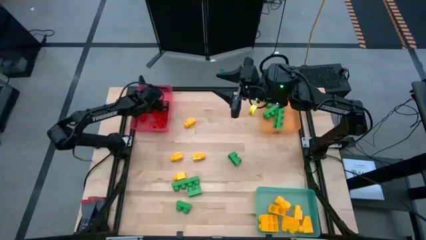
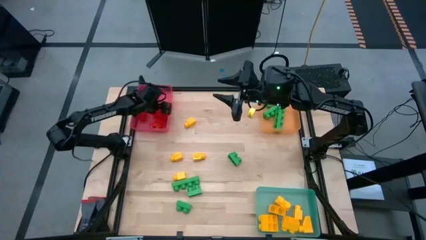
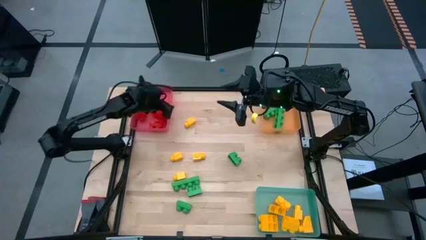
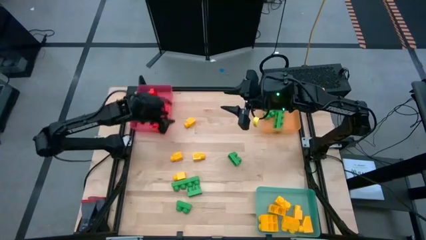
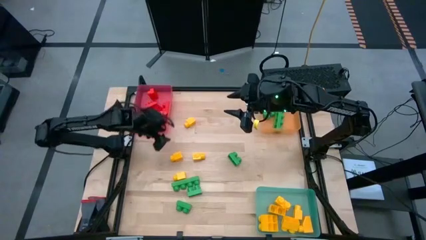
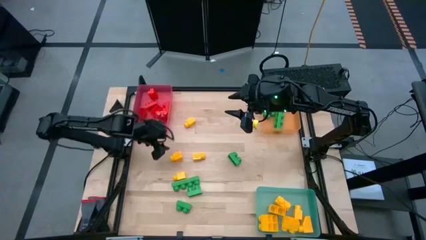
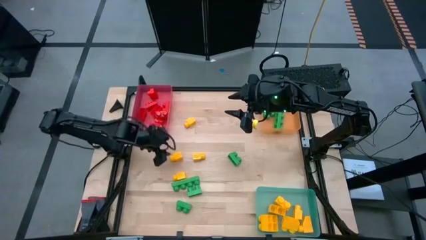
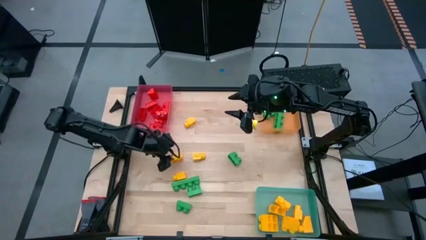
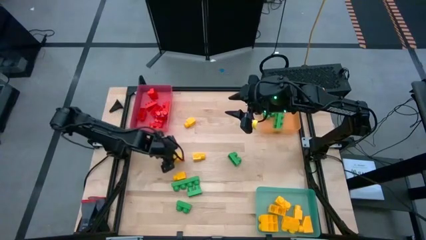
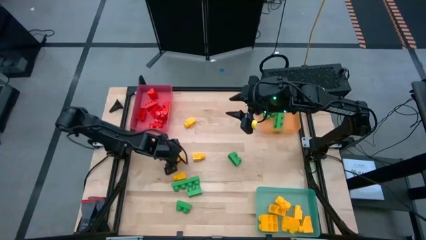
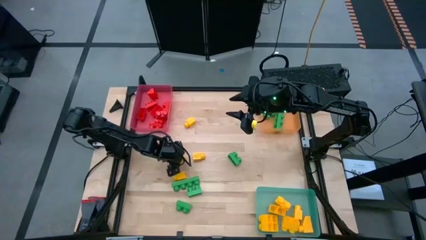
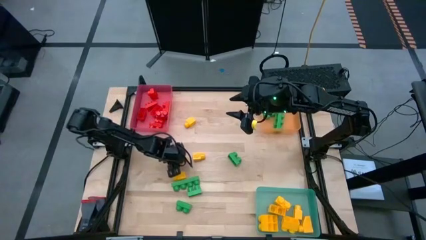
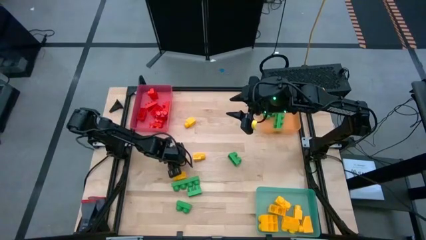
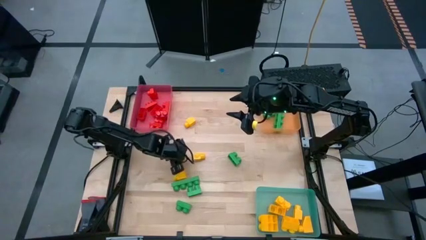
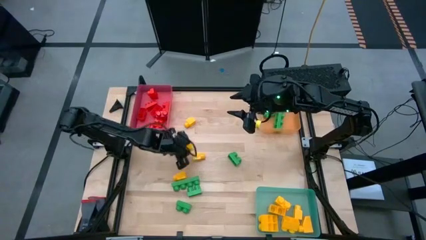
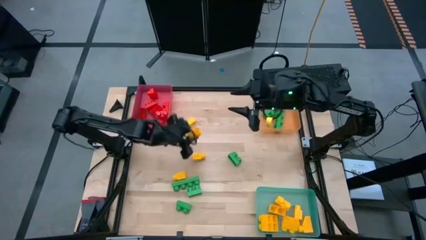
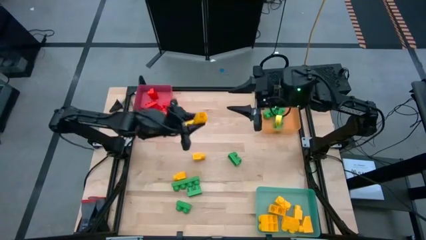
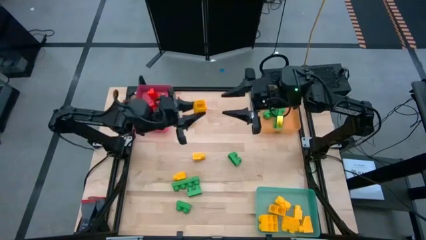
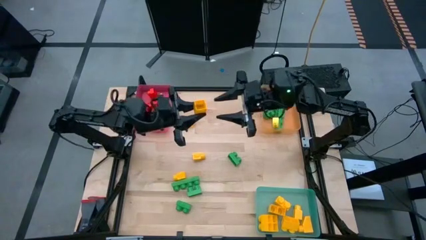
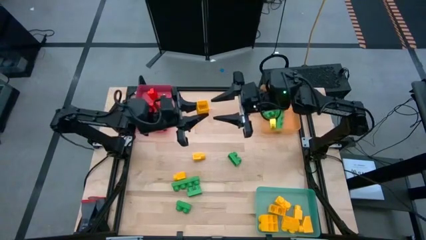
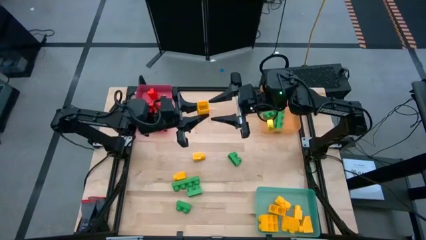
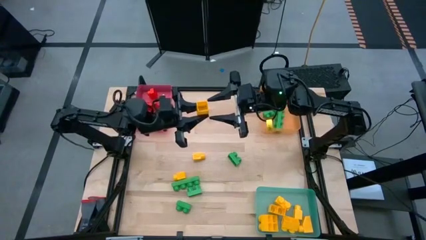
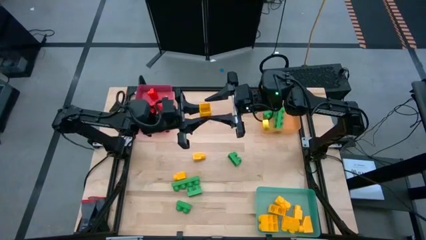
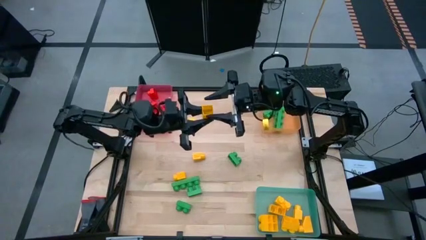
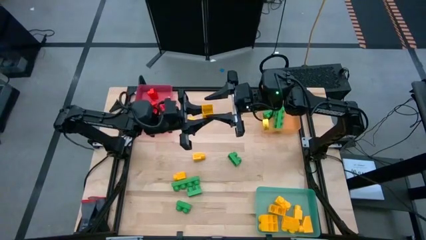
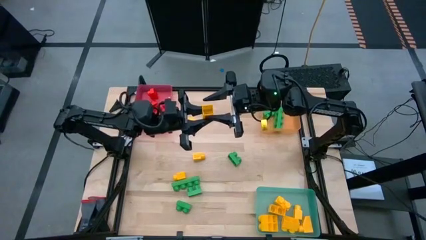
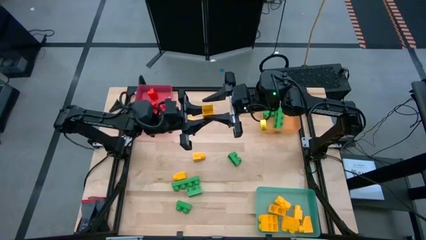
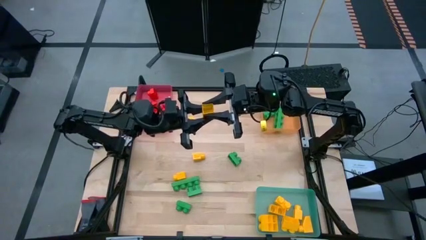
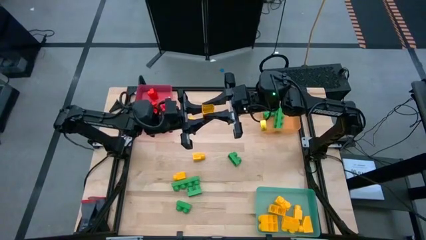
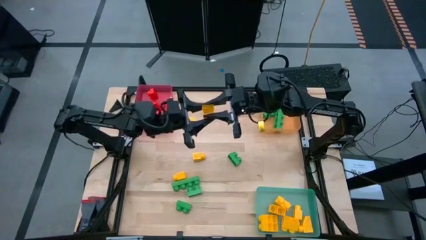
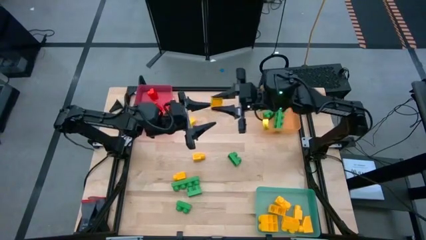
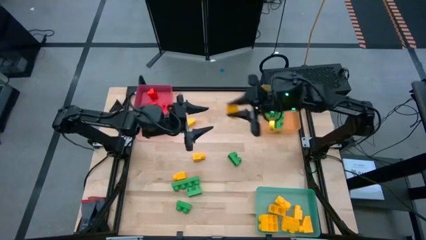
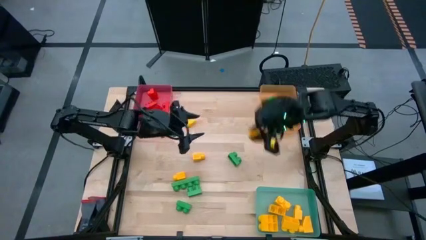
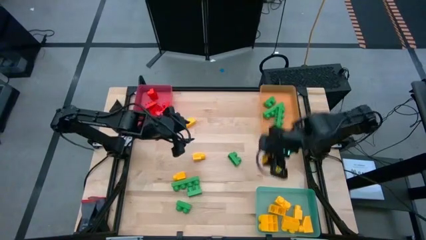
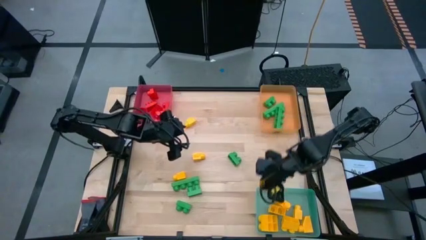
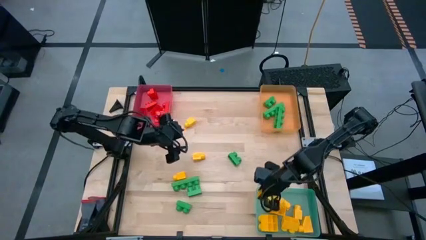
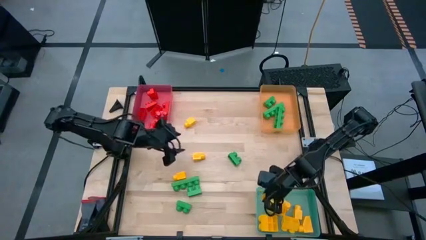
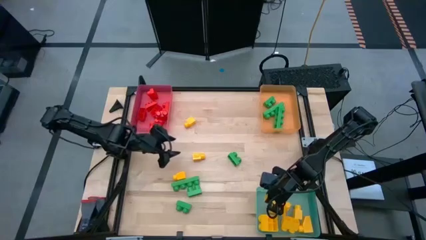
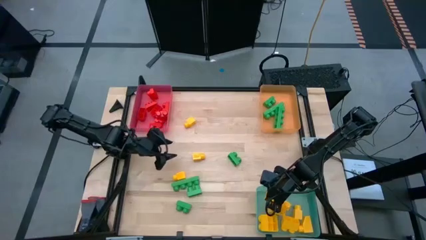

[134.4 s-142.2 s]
Task: Sort blocks
Put the yellow game piece into the blue bin

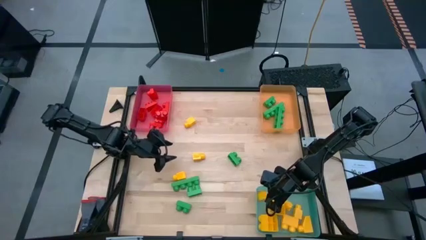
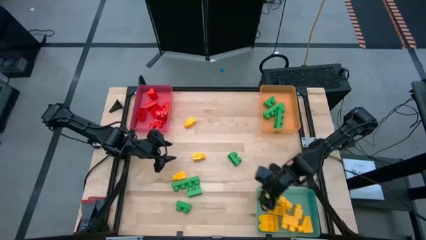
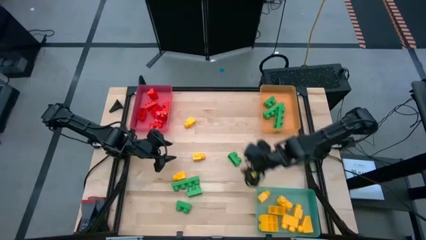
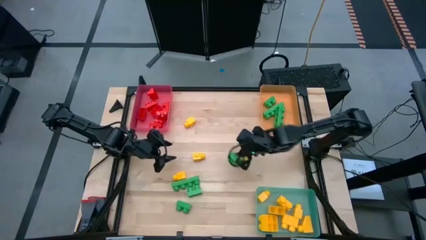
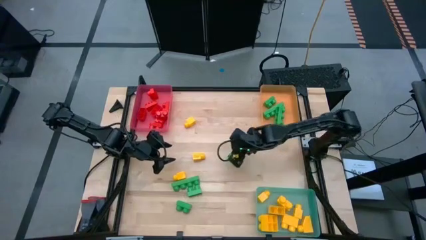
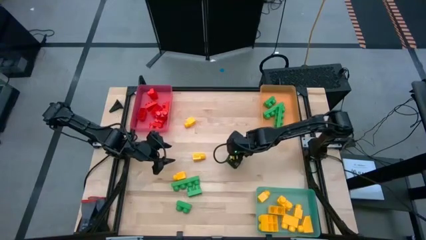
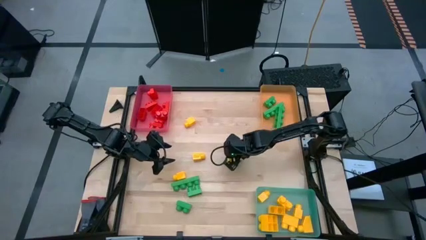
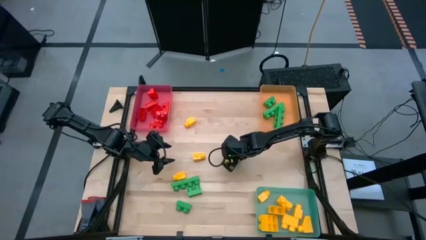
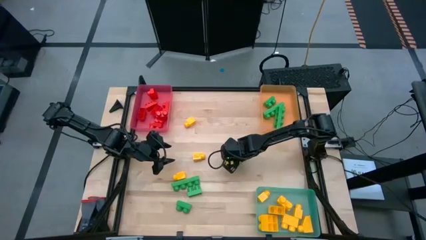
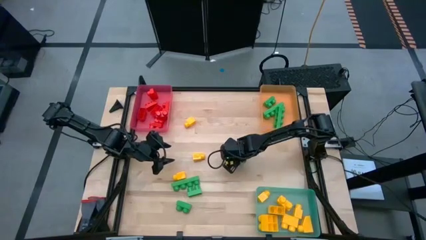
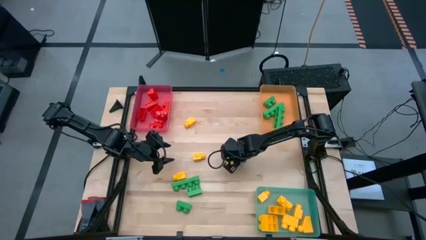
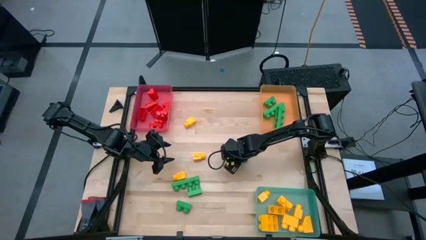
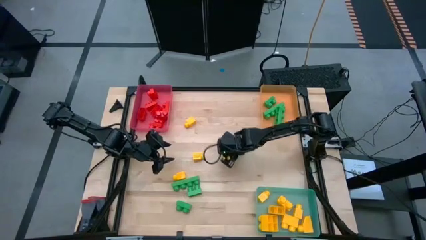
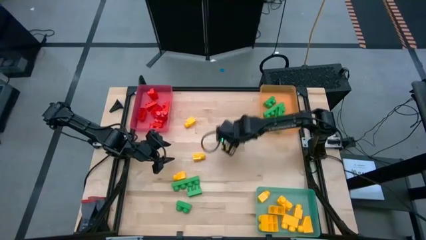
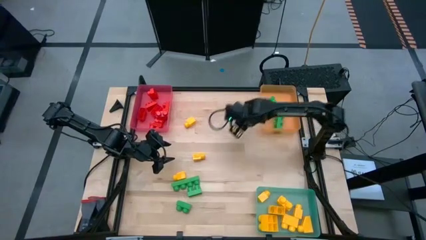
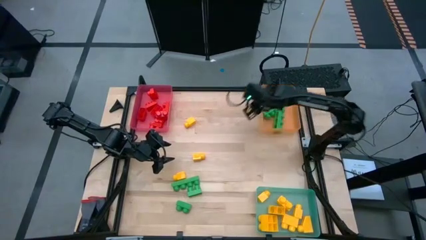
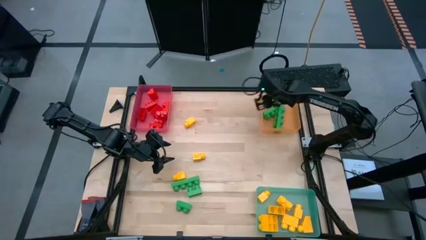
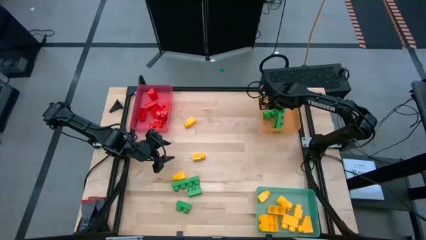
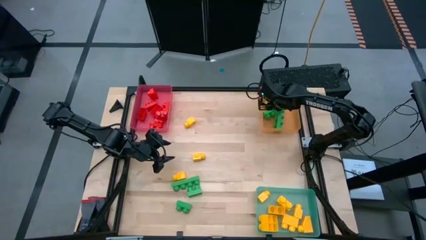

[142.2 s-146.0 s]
Put the green game piece into the orange bin

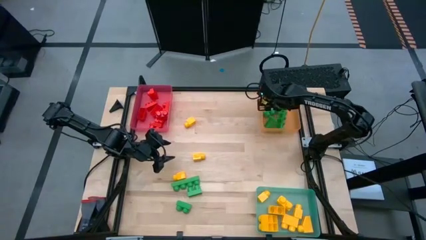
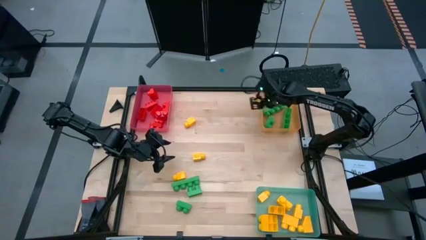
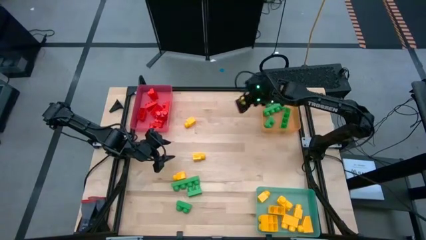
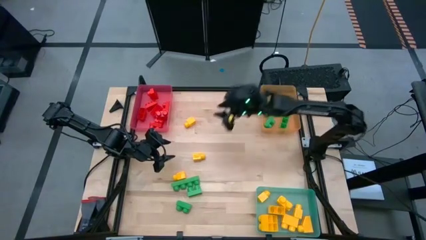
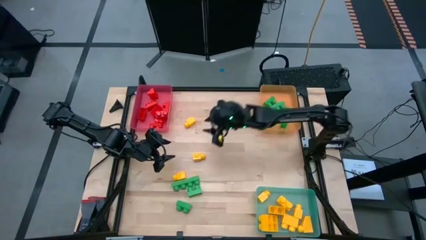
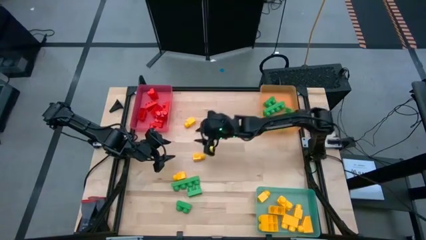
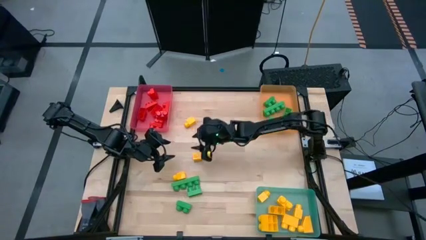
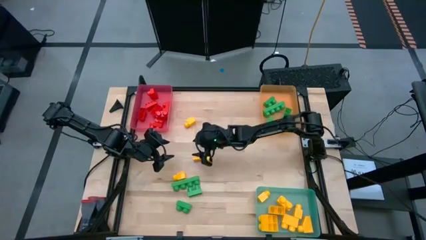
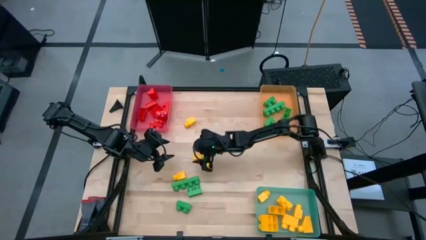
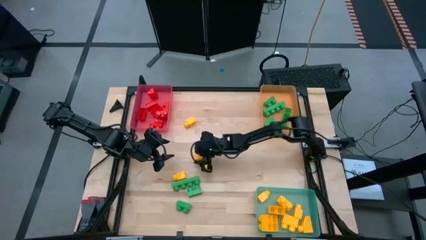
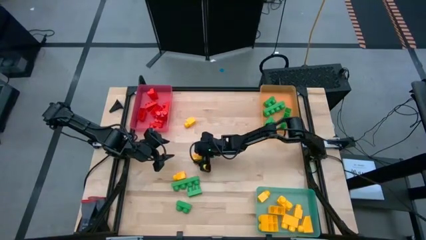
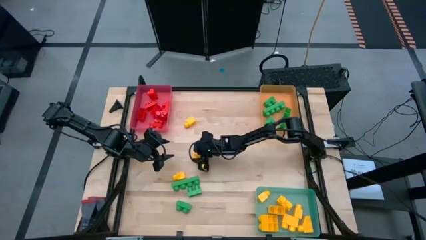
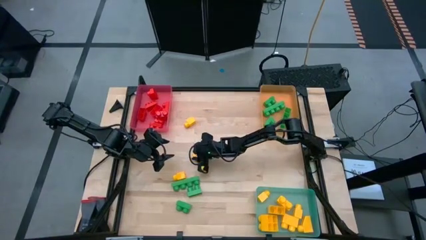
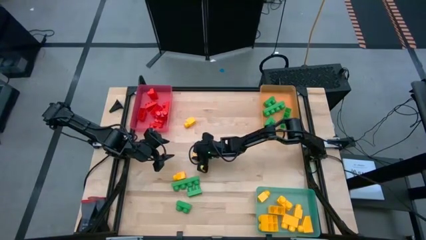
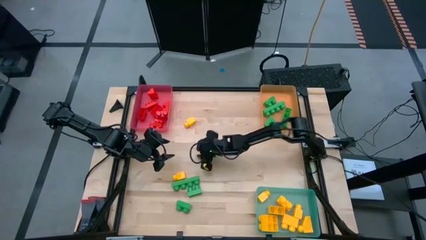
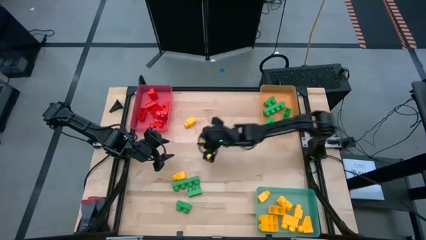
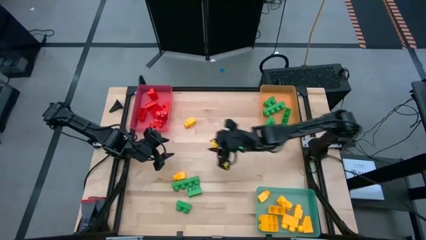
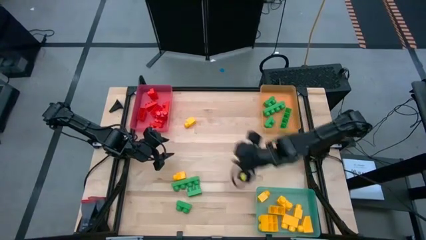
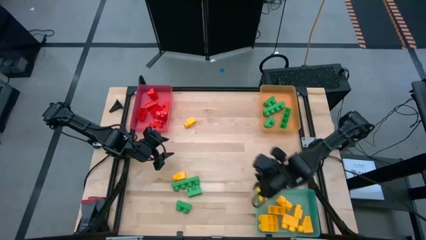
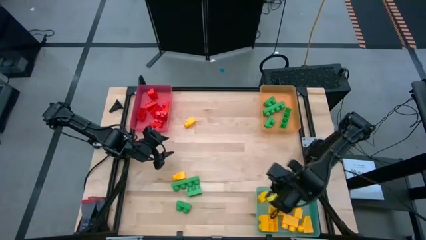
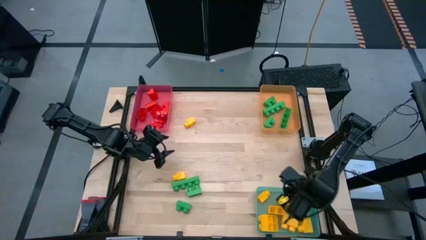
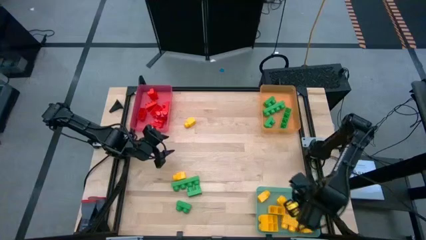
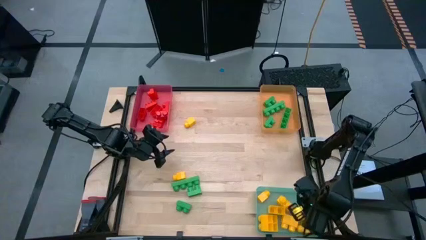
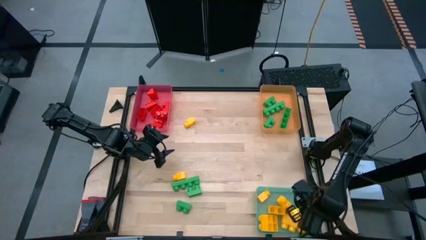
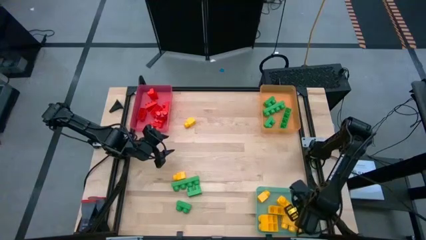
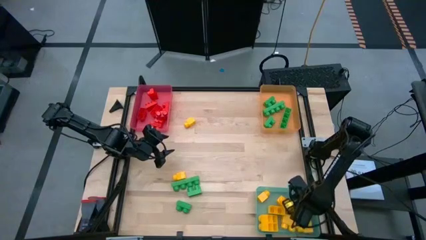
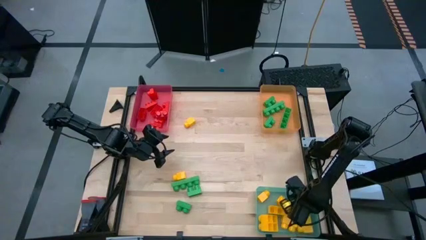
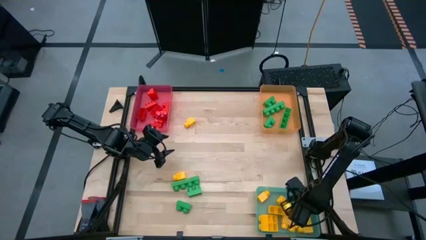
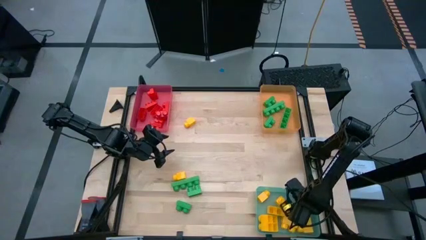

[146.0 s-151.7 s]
Put the yellow game piece into the blue bin
